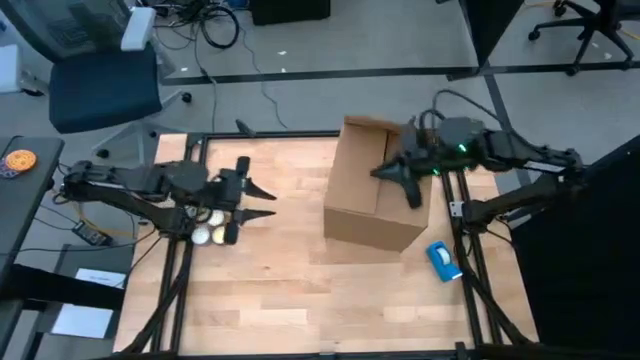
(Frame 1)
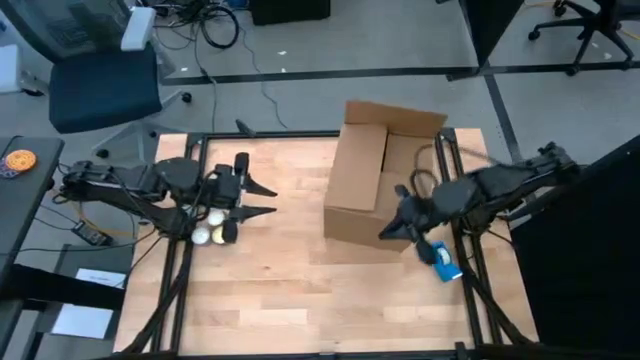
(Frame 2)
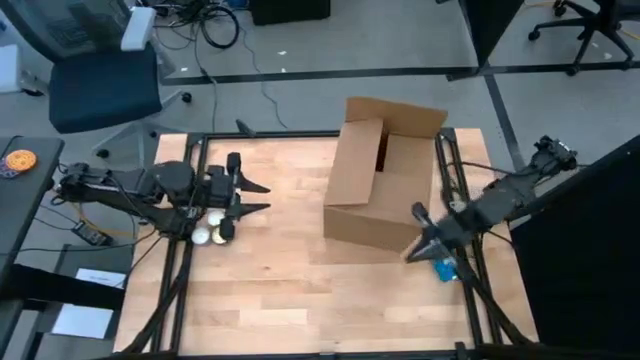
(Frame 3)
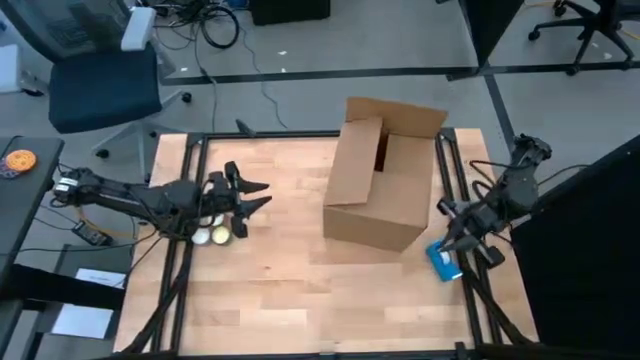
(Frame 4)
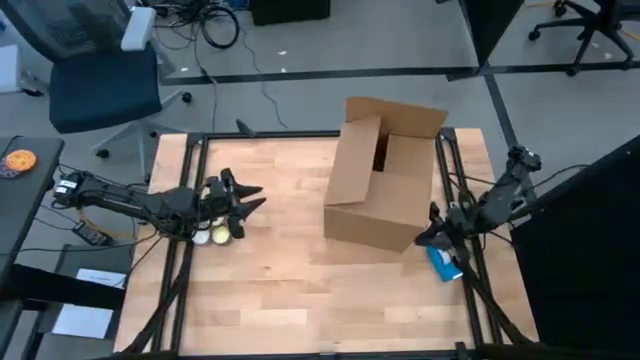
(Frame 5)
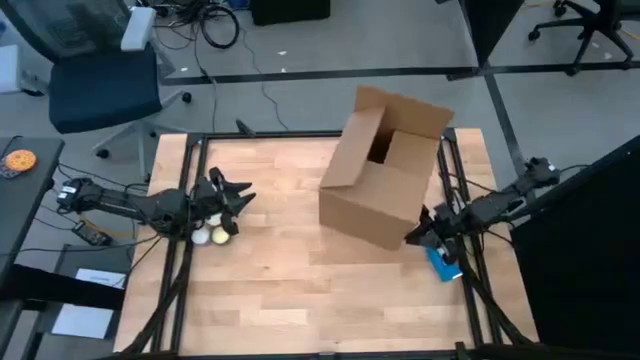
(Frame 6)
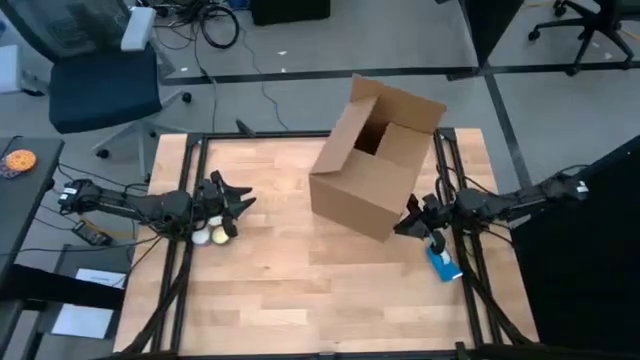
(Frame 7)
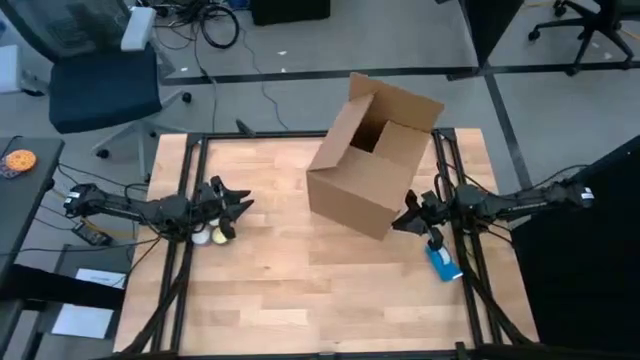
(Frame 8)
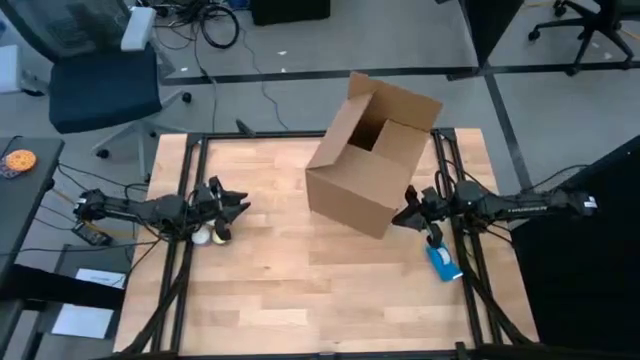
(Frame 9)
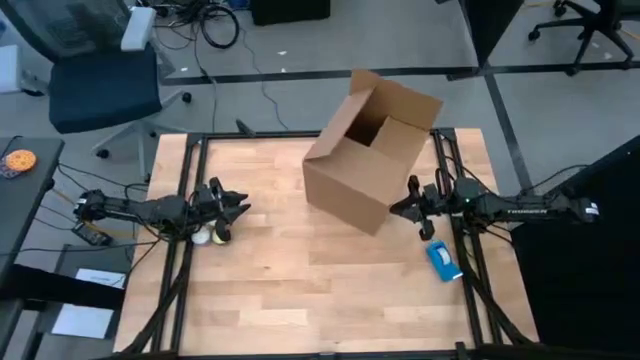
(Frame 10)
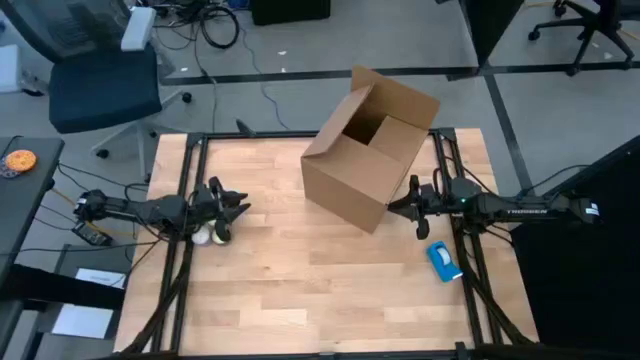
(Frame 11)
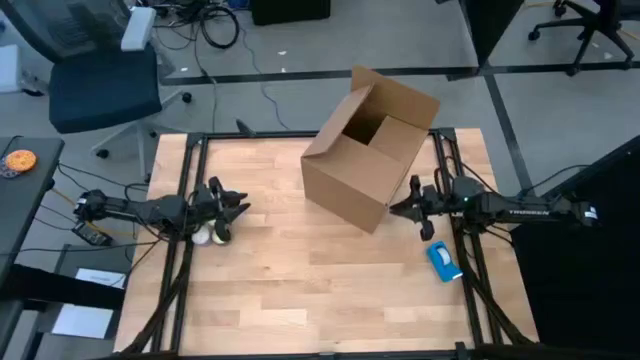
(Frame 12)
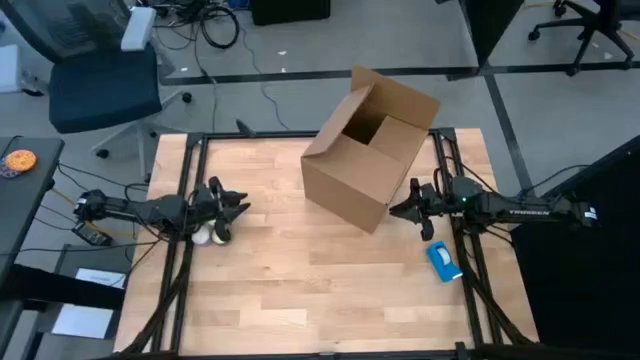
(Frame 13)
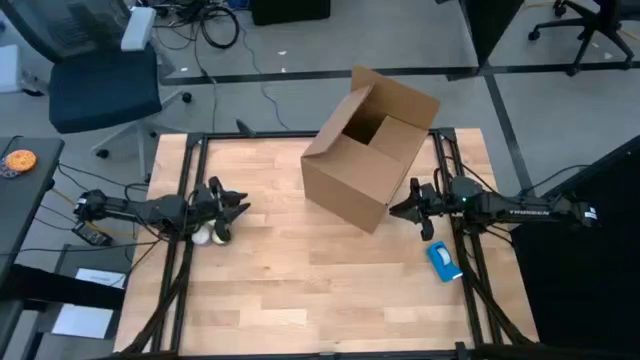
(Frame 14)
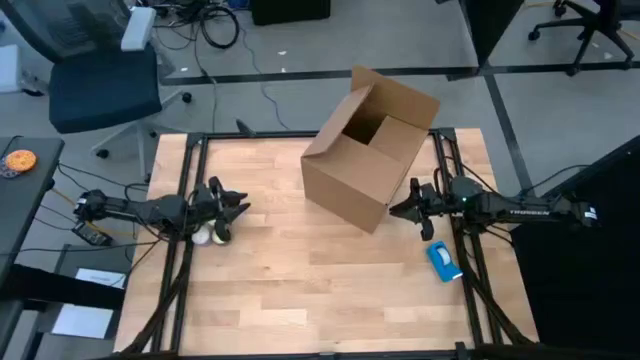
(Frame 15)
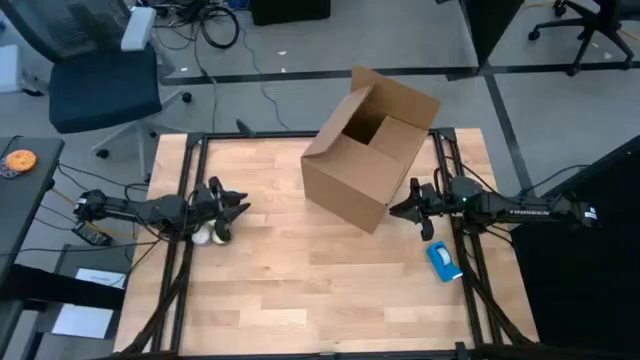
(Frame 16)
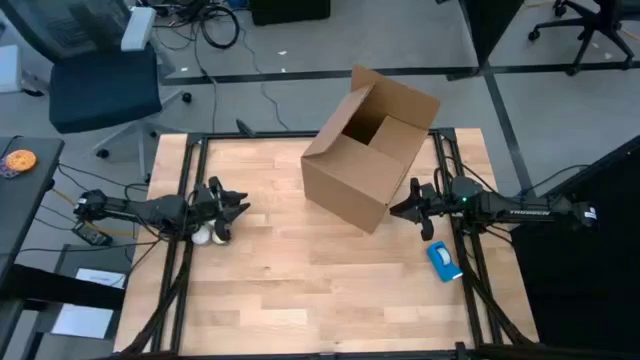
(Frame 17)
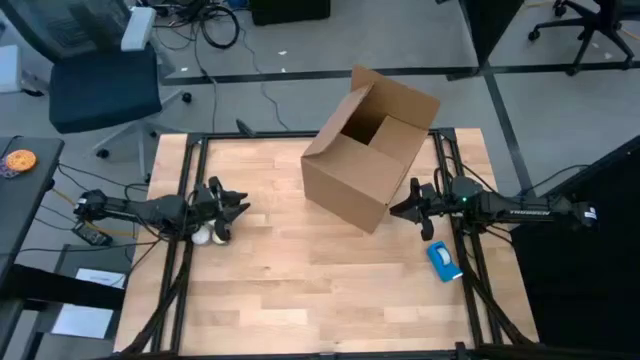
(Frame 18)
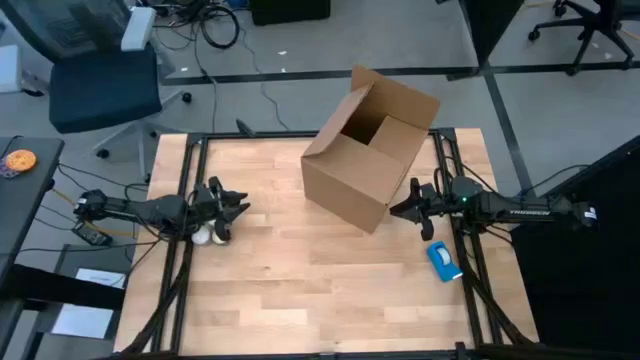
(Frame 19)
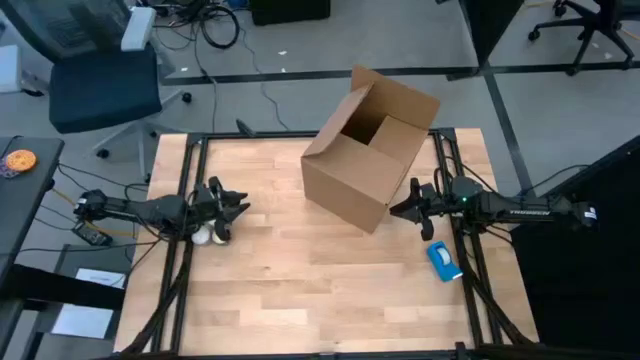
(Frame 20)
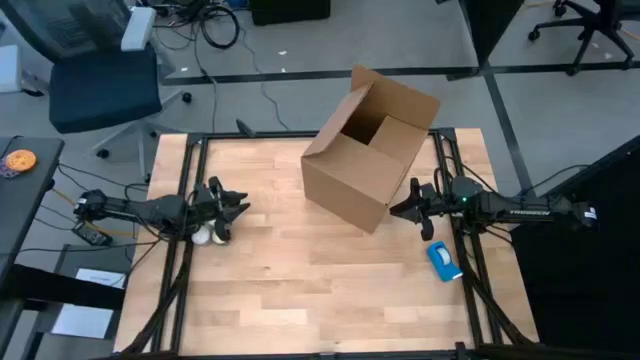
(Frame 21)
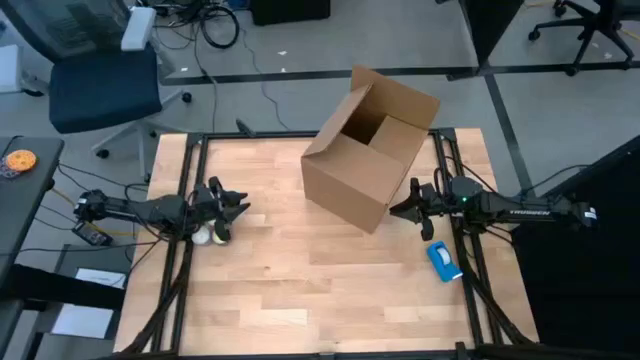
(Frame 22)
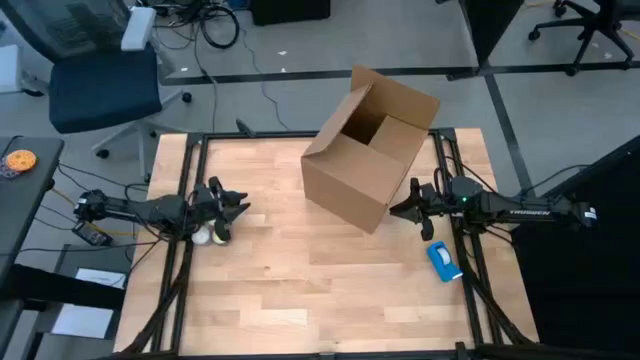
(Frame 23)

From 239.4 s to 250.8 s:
Task: wrap mug
Return to Home Position

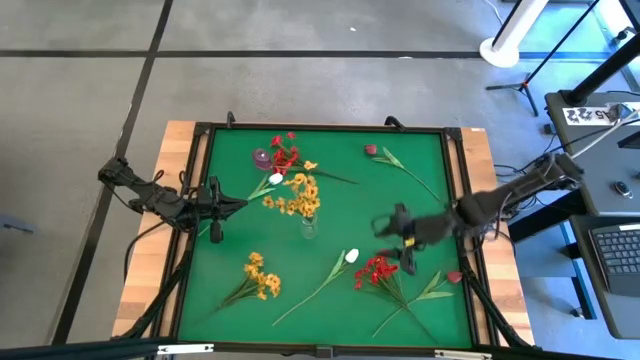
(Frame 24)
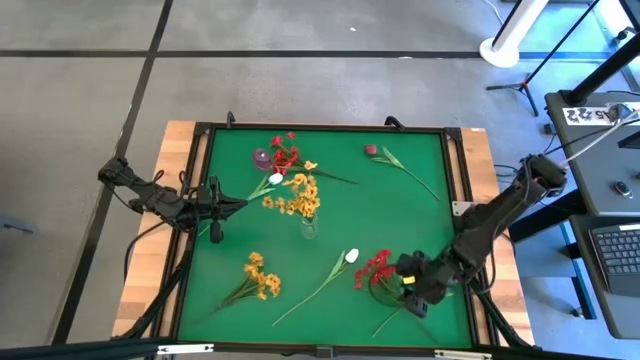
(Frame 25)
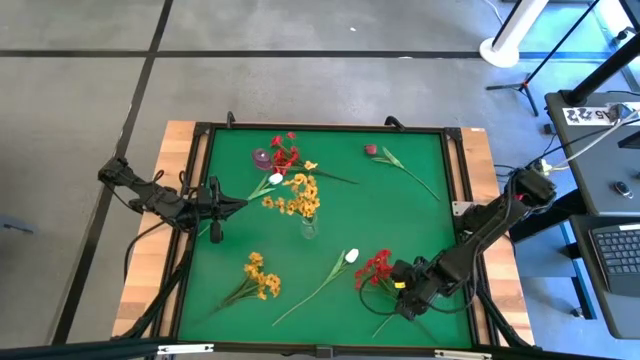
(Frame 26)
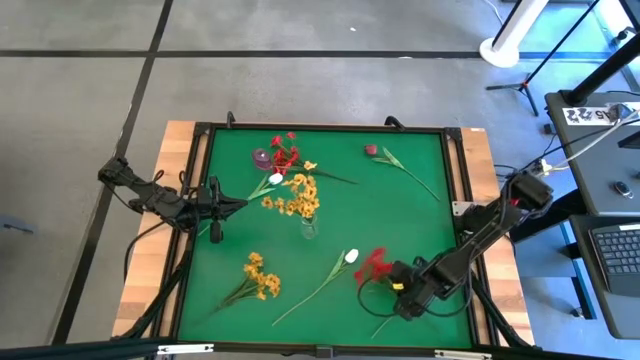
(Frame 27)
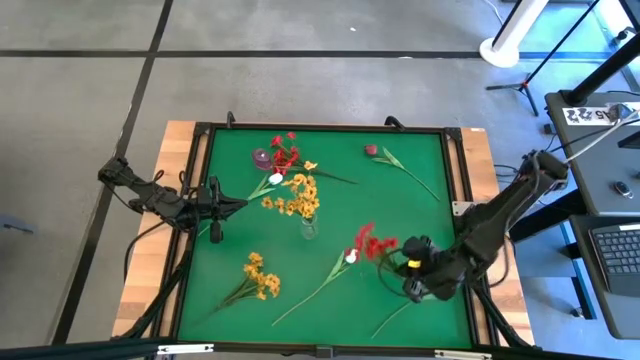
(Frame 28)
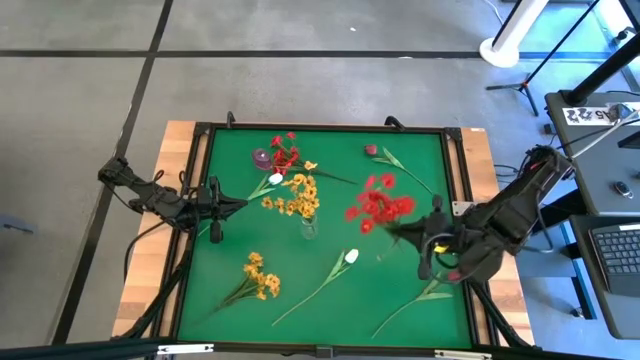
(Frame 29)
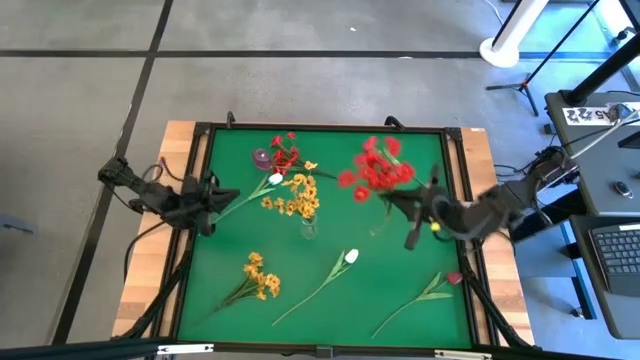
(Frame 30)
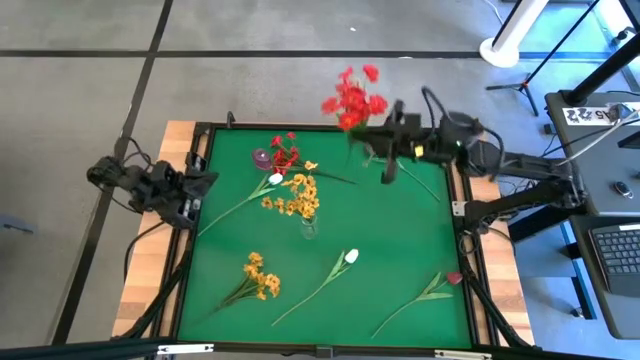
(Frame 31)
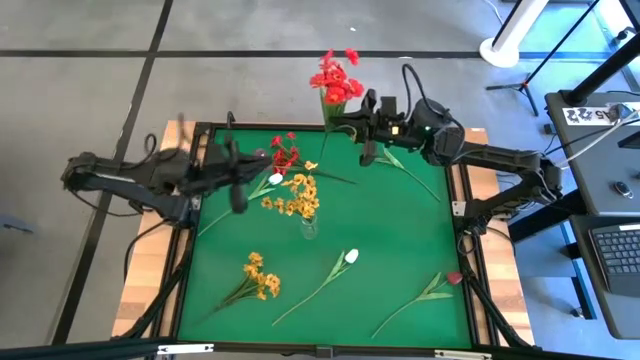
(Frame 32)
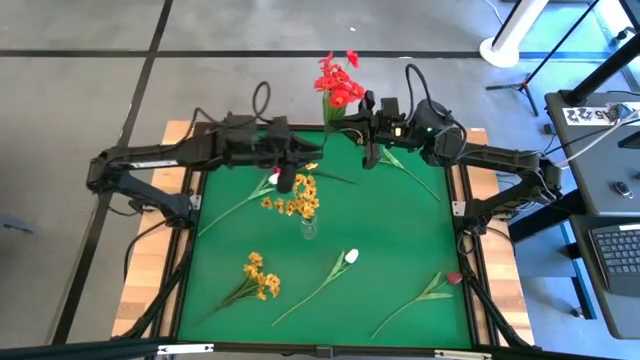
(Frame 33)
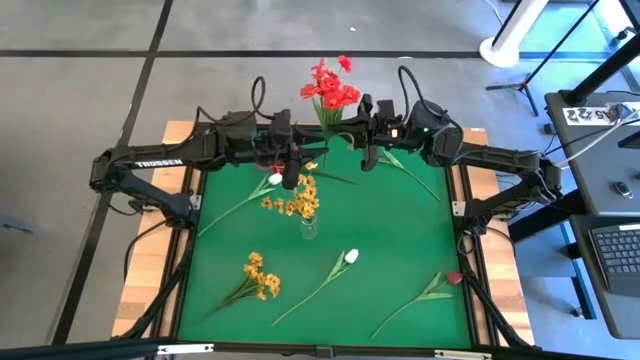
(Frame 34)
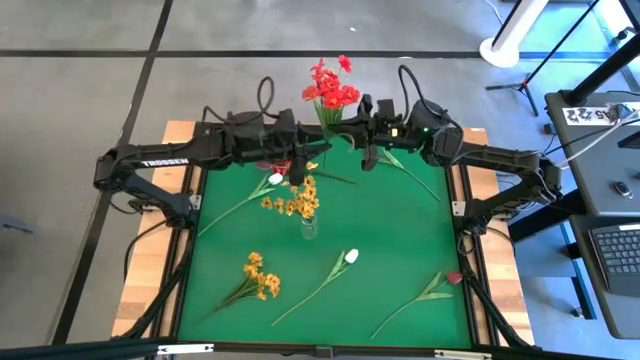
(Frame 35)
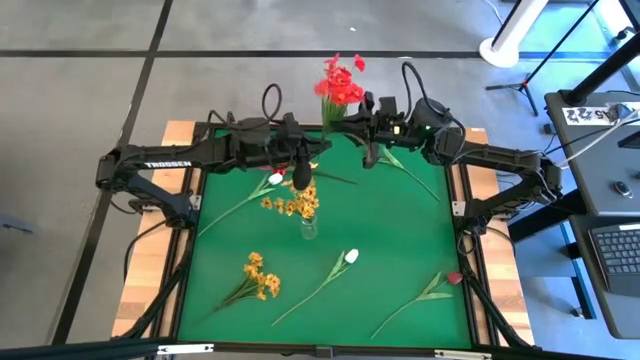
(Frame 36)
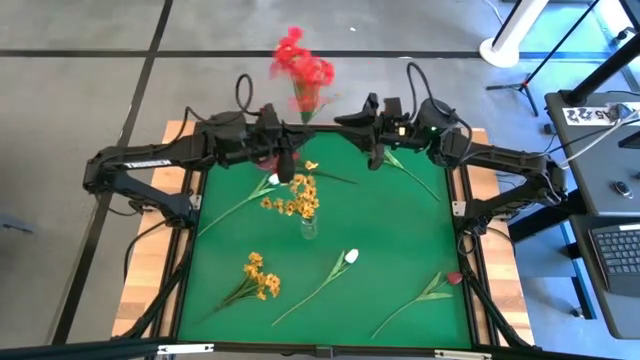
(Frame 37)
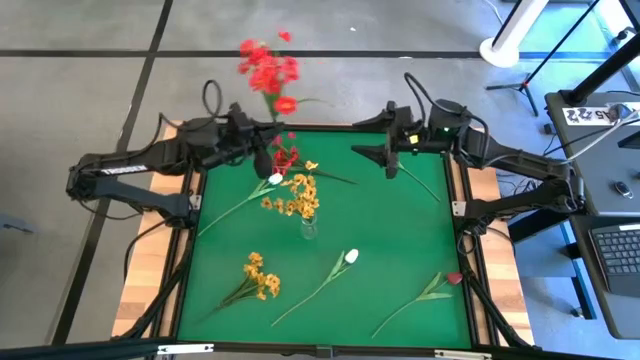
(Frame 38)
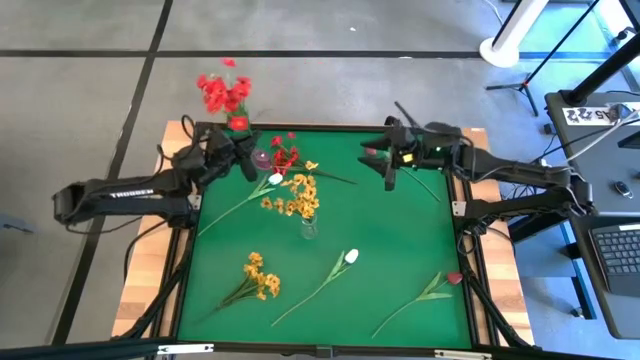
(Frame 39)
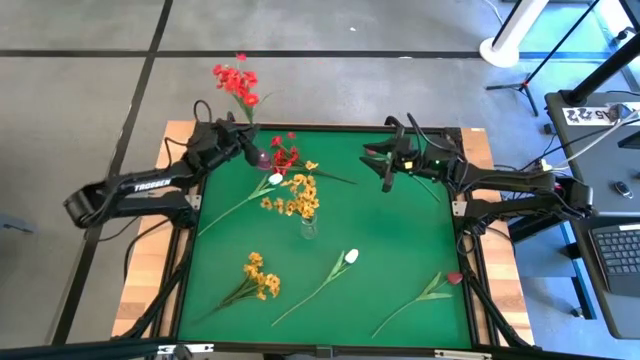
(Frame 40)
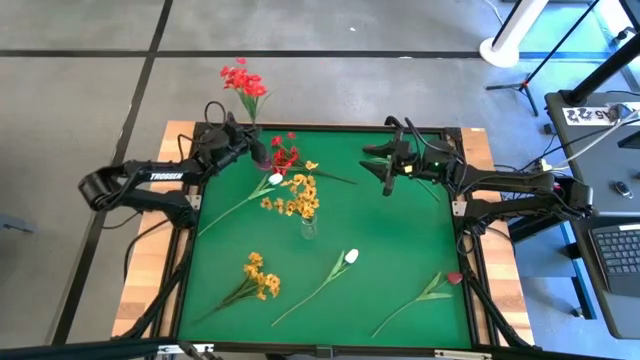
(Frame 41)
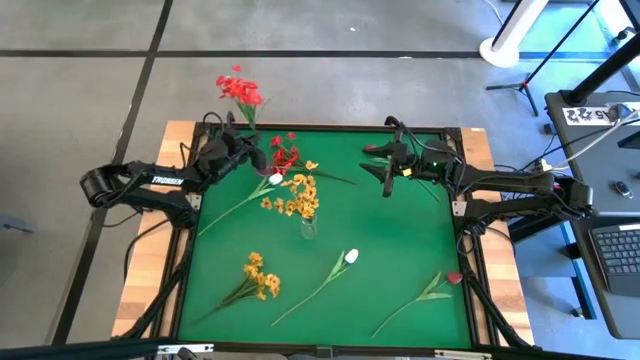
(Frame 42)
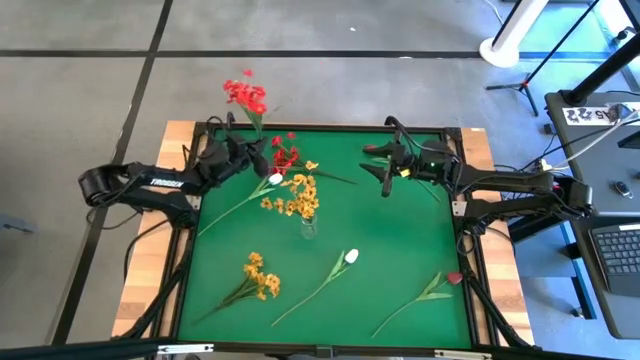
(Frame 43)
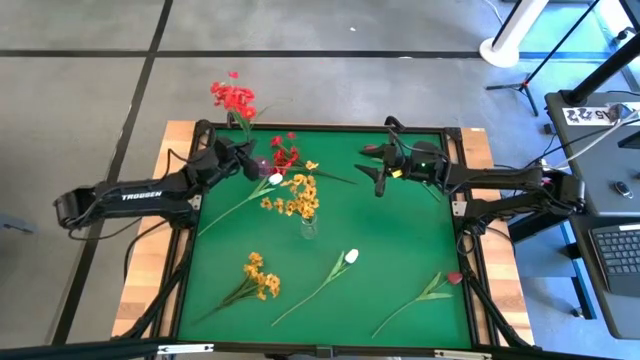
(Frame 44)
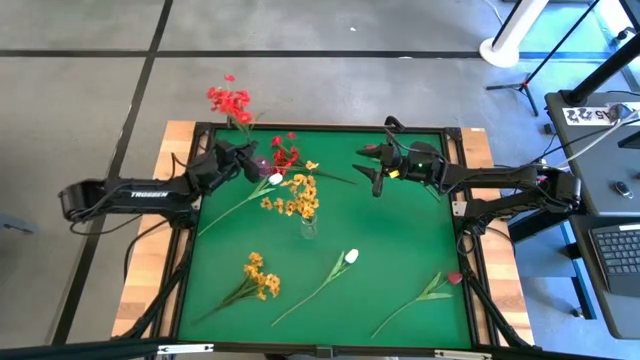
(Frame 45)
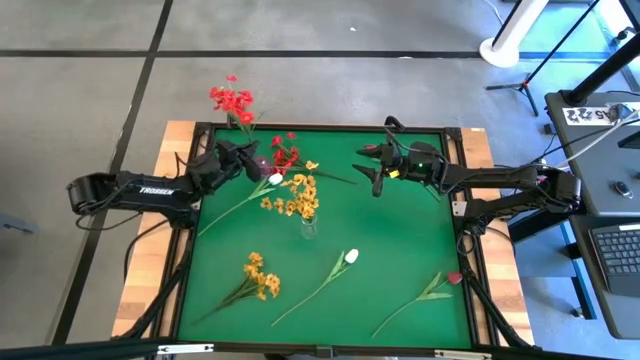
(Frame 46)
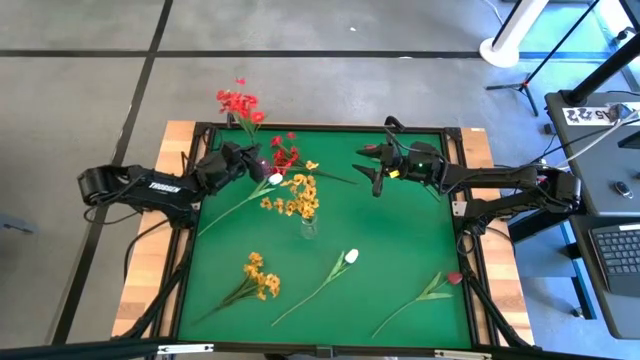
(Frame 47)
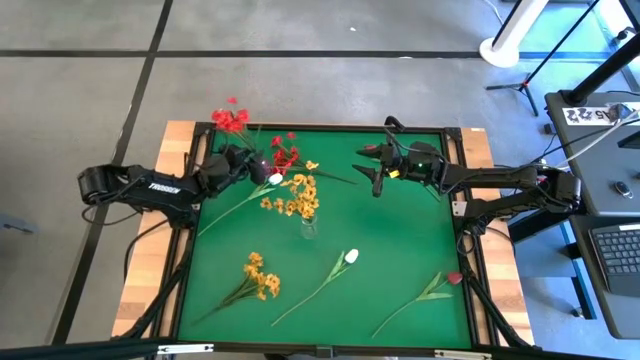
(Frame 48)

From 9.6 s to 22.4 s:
Task: Sort flowers into vase by color
Put the bottom red flowers into the violet vase
